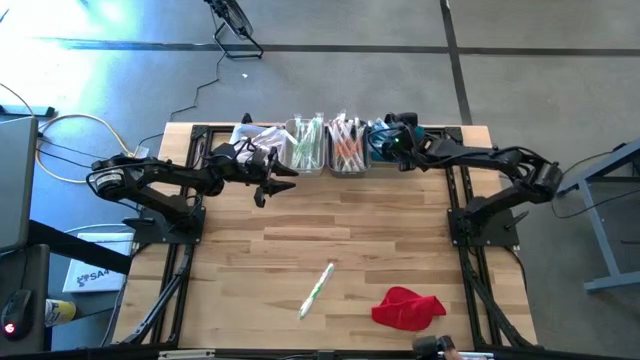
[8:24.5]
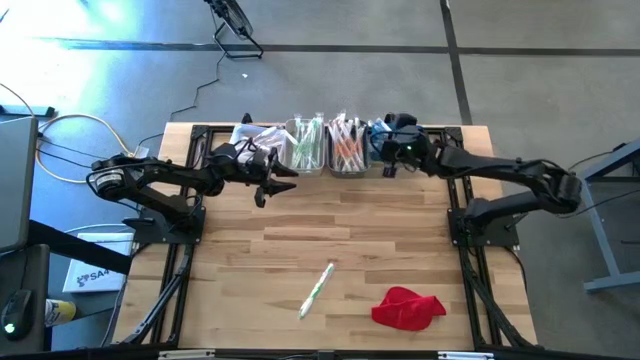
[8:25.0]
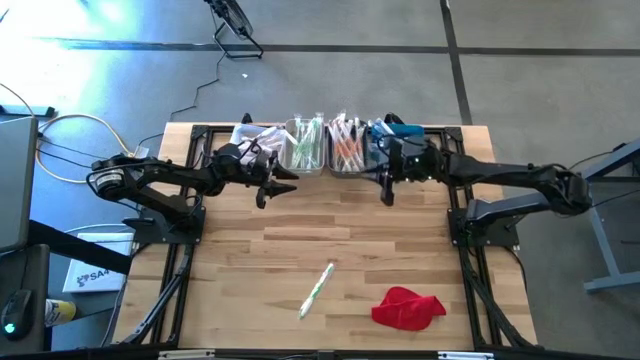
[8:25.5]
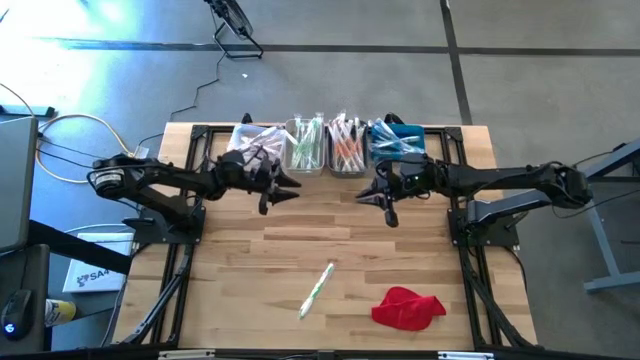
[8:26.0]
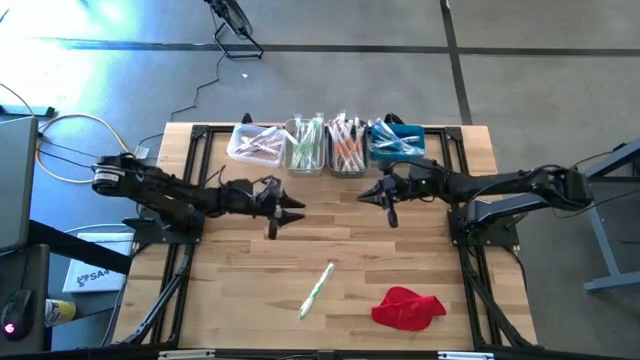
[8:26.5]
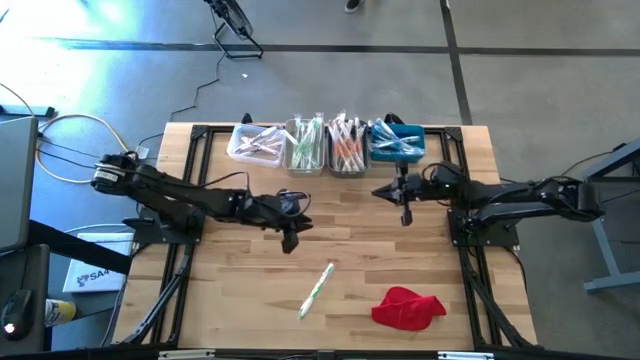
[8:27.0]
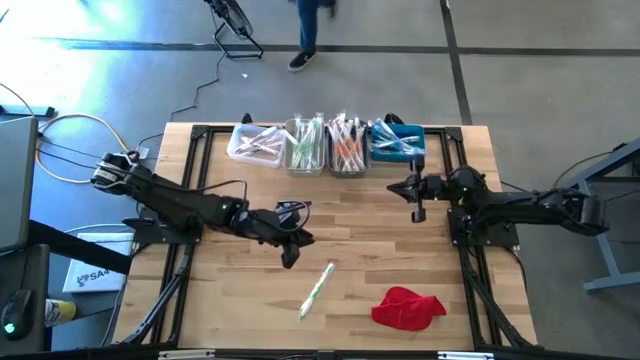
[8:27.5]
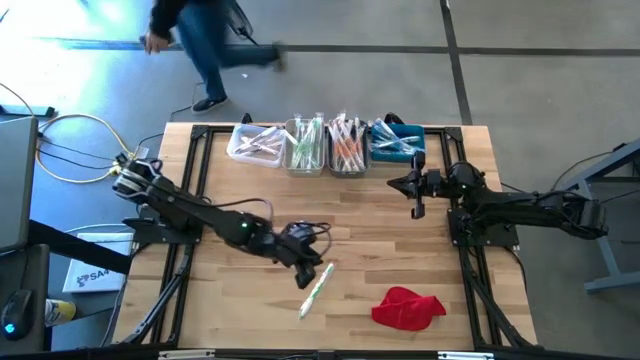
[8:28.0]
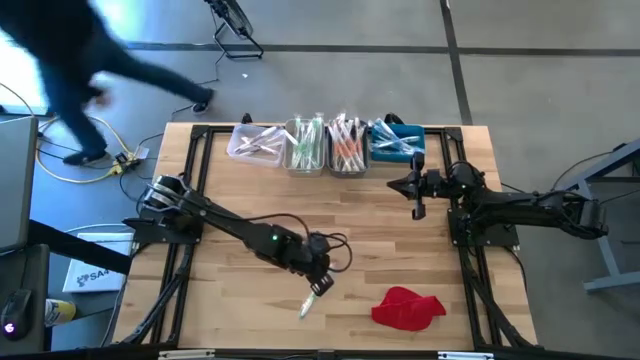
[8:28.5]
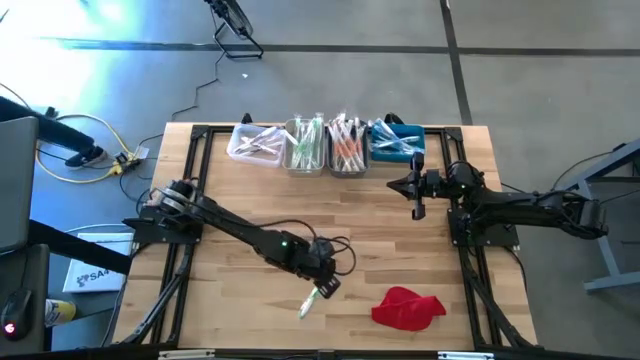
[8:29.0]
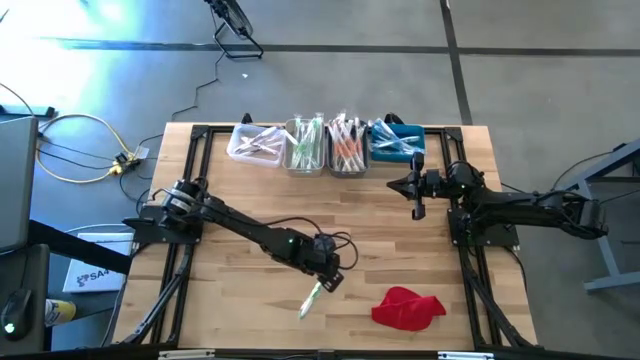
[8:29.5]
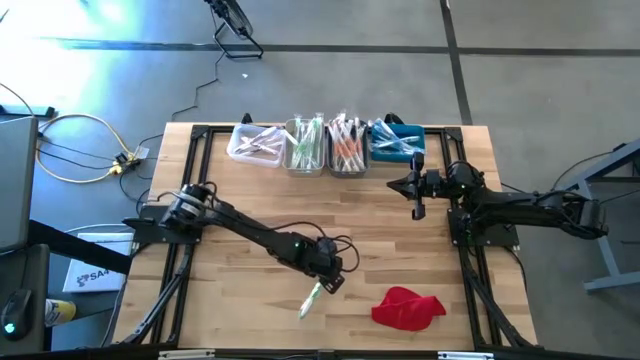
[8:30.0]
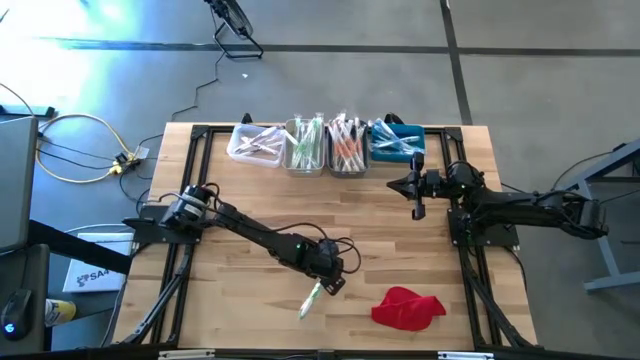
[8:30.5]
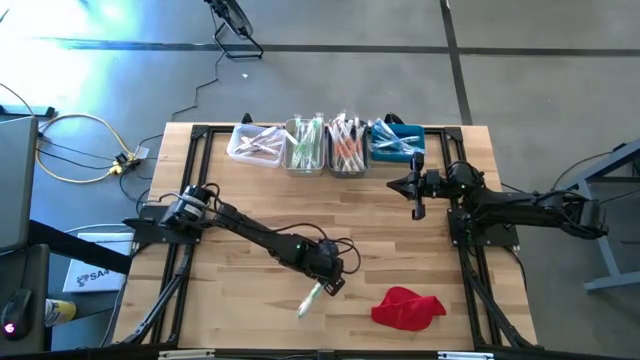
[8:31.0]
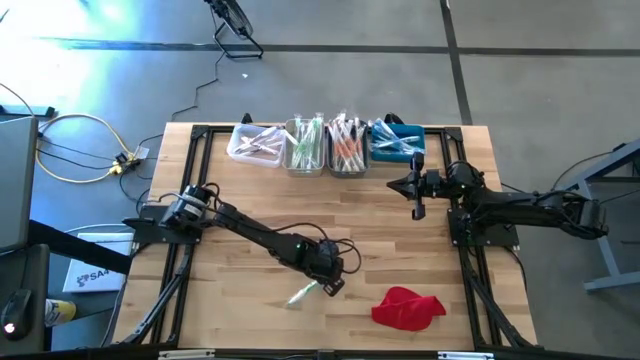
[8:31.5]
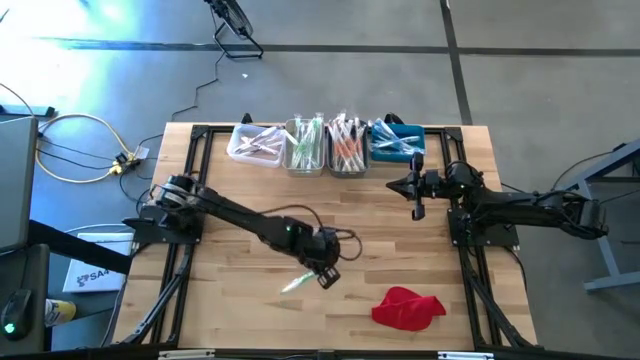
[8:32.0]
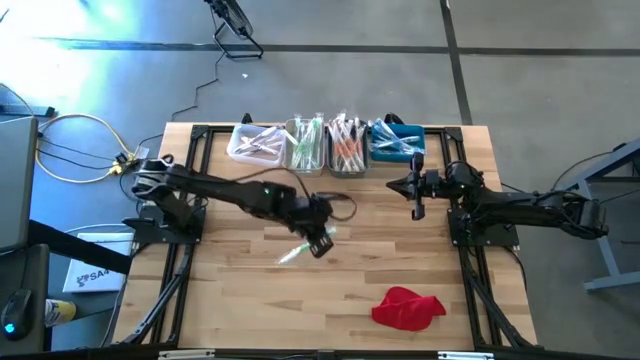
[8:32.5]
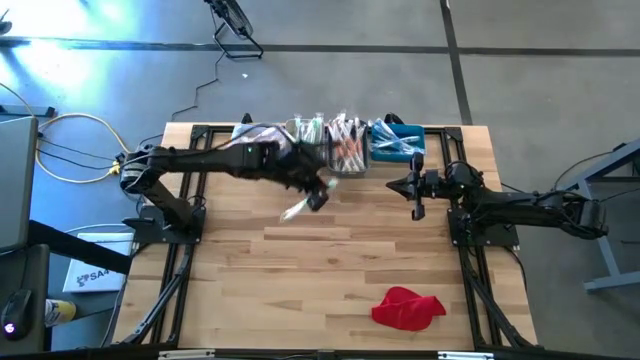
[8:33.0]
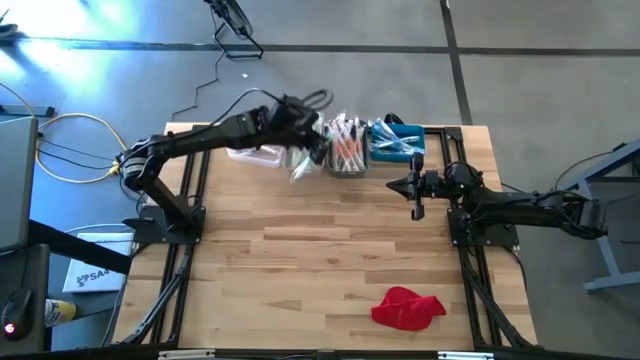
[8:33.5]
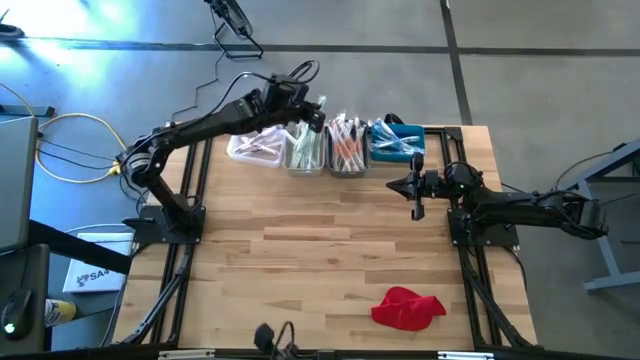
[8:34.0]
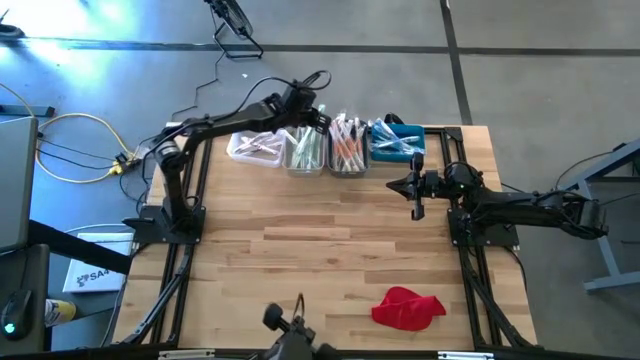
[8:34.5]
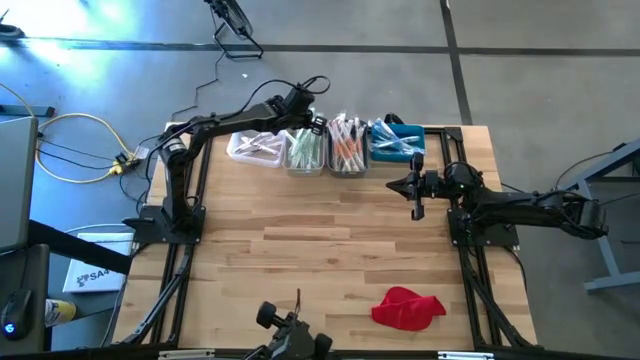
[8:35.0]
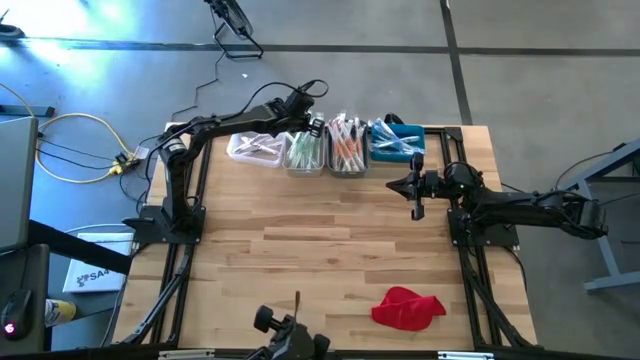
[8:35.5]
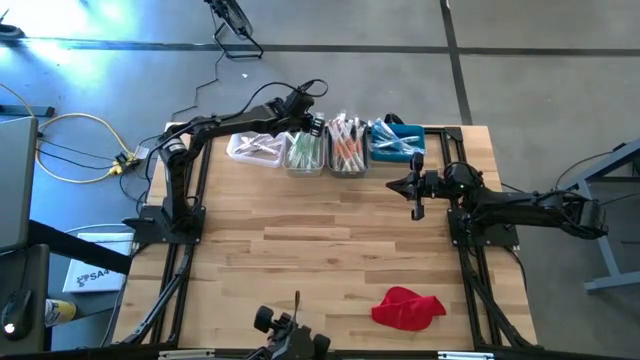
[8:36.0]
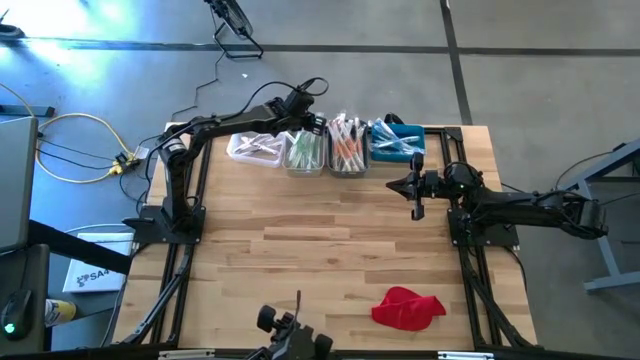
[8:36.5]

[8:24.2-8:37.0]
Task: Pick & Place Toothbrushes
Put the green toothbrush into the gray bin

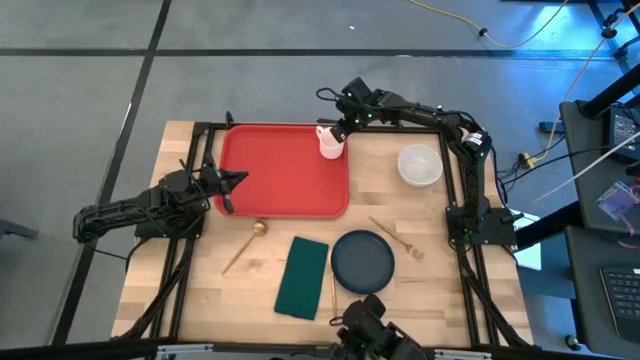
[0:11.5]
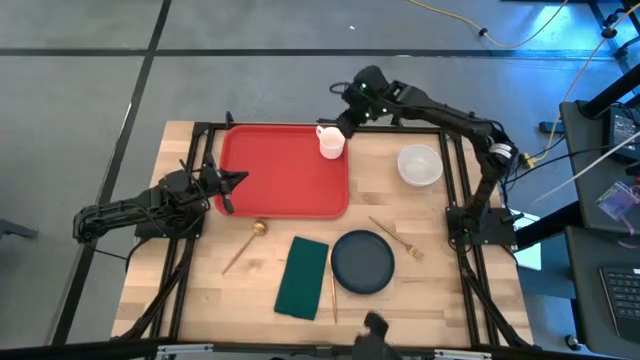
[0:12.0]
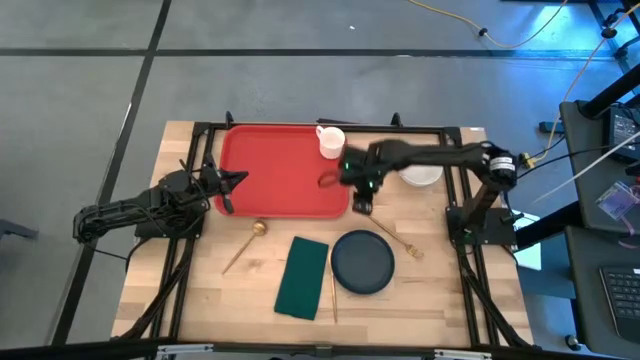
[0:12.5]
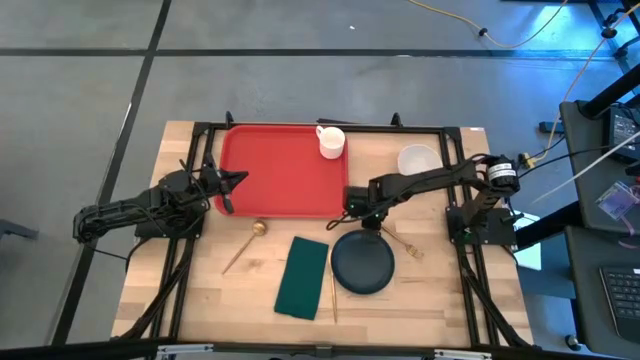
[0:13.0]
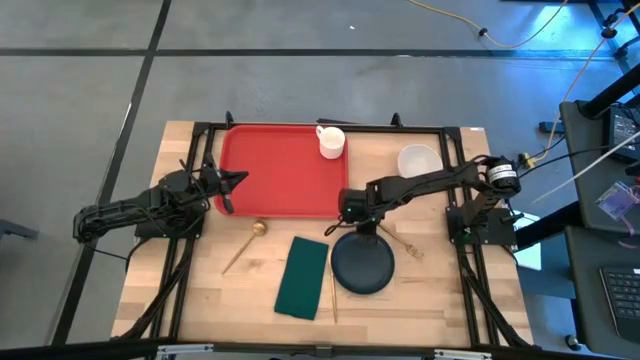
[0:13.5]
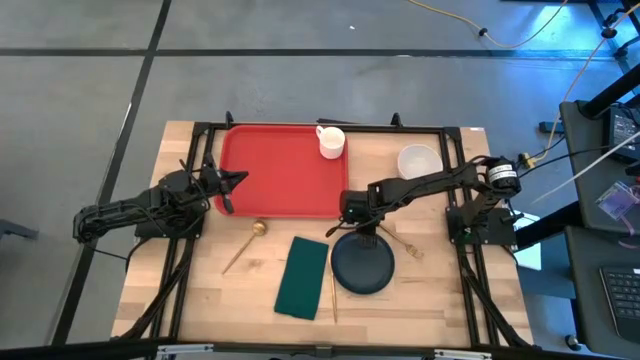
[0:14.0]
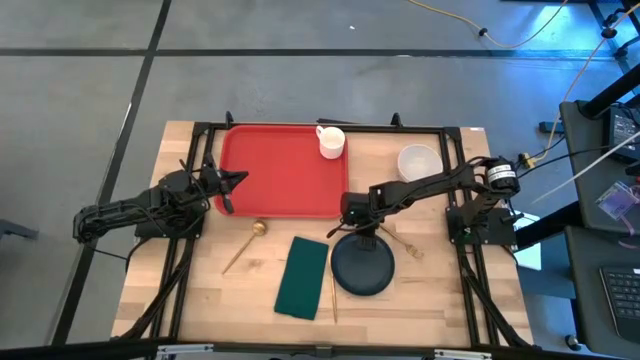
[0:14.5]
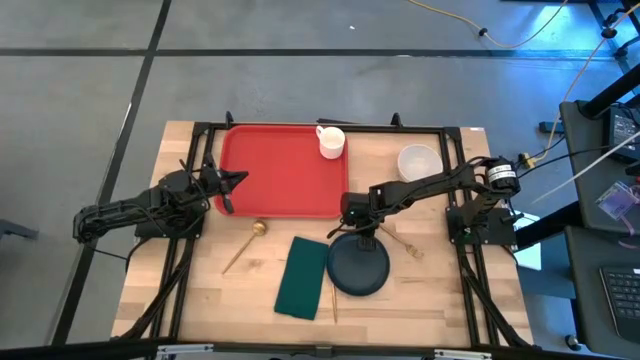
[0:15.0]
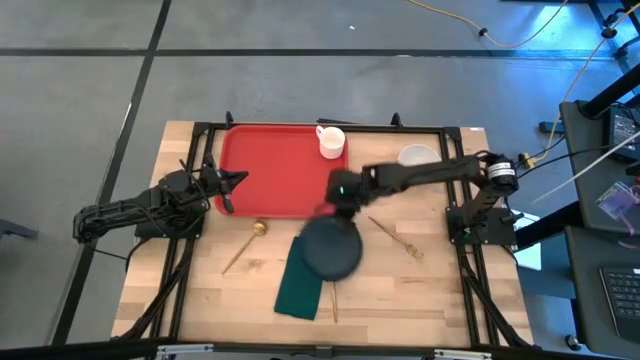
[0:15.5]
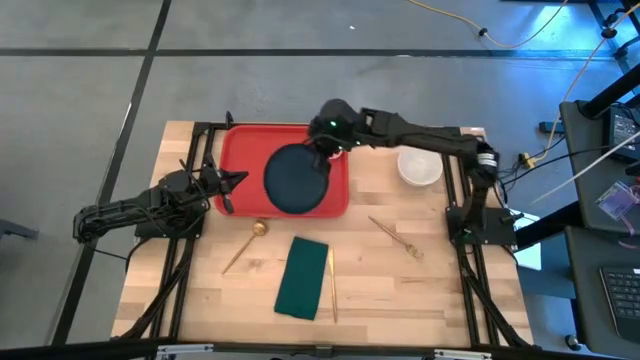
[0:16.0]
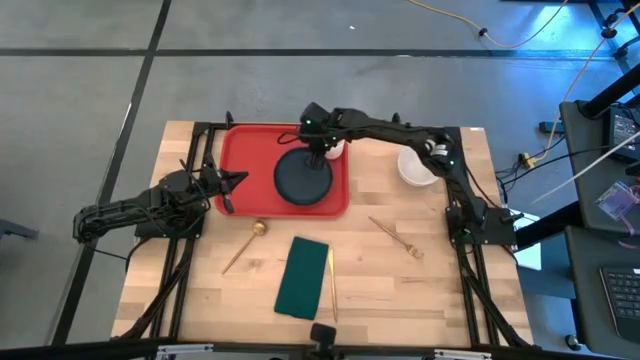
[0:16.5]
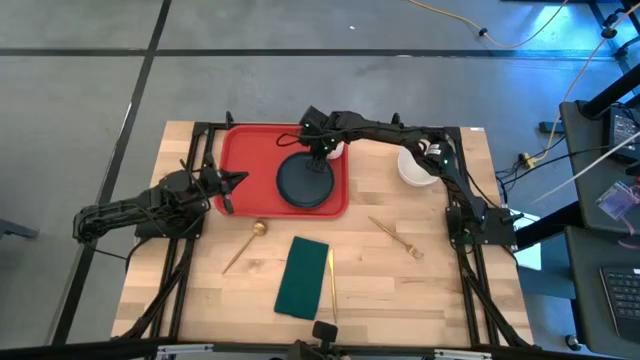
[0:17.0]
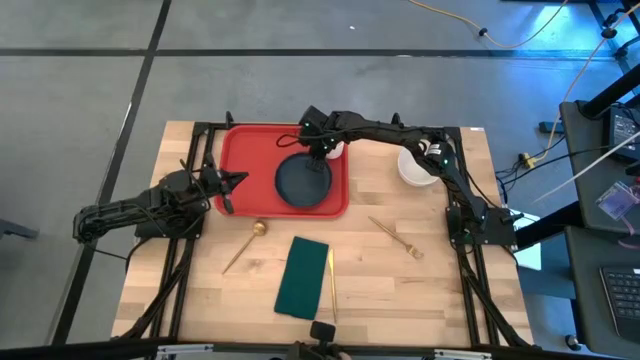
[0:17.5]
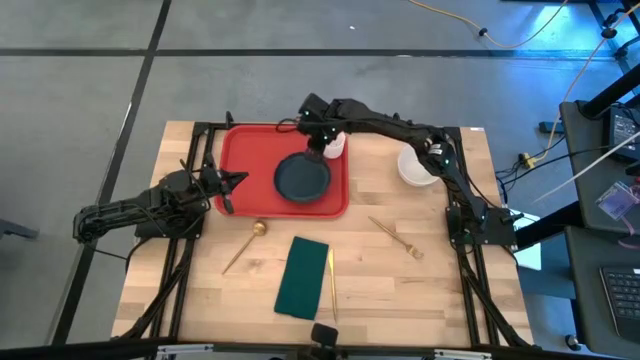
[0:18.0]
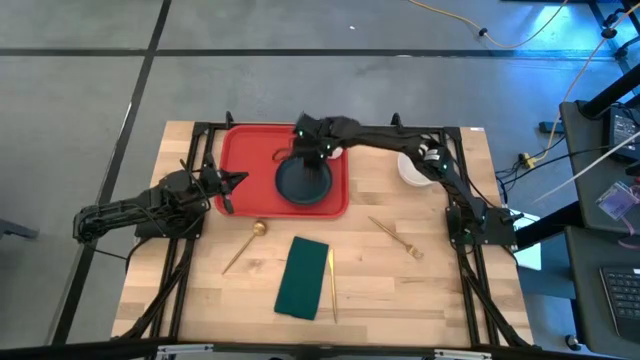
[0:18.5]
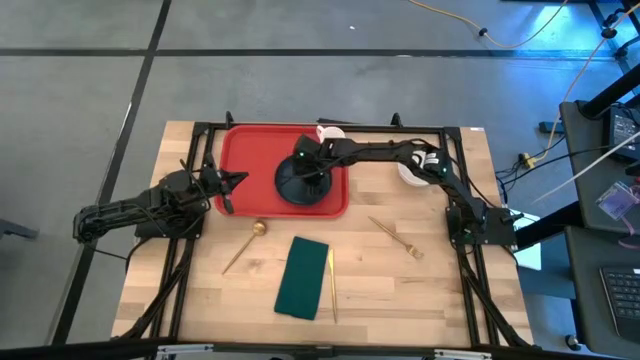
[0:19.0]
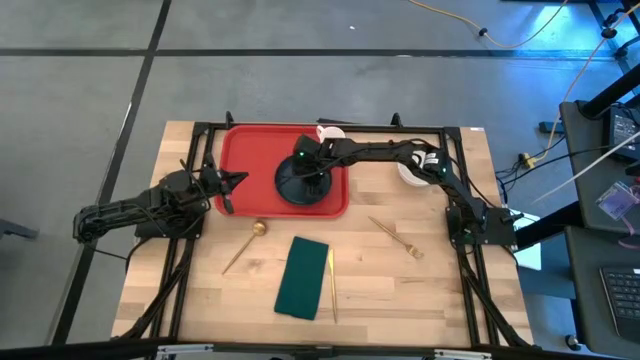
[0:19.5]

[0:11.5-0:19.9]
Task: Set up tray
Put the blue plate on the red tray
